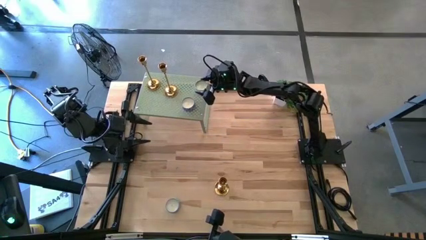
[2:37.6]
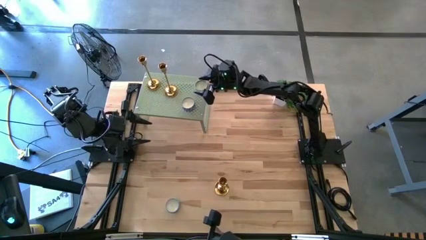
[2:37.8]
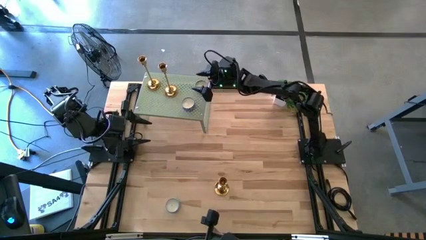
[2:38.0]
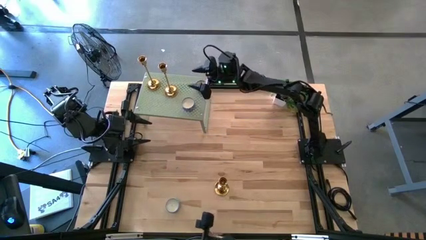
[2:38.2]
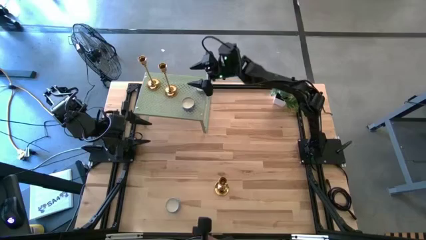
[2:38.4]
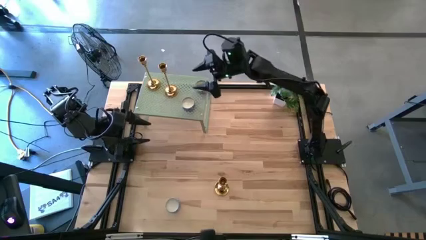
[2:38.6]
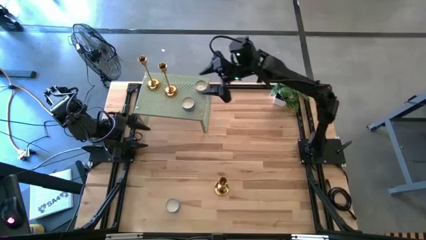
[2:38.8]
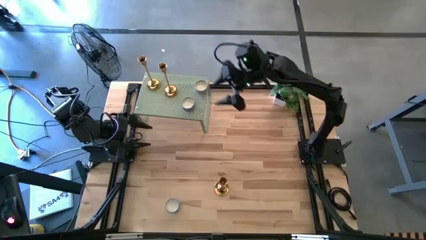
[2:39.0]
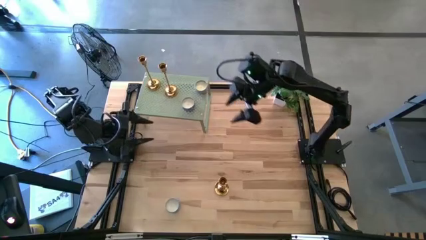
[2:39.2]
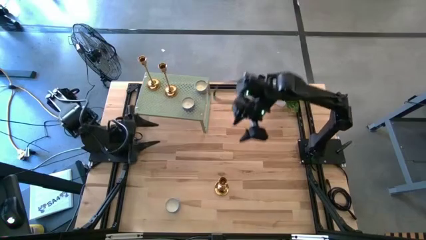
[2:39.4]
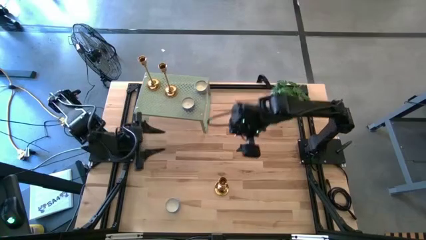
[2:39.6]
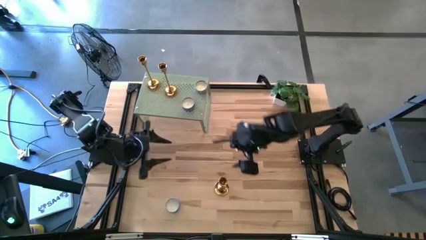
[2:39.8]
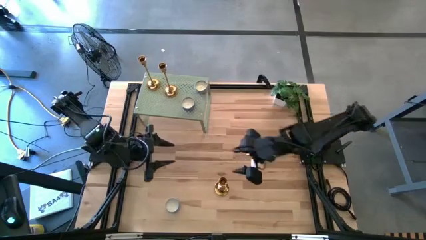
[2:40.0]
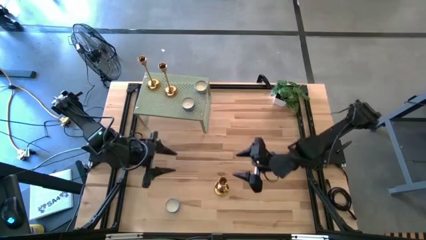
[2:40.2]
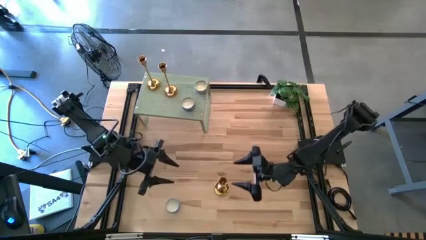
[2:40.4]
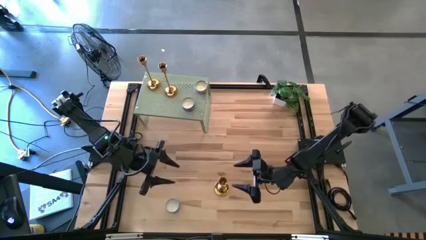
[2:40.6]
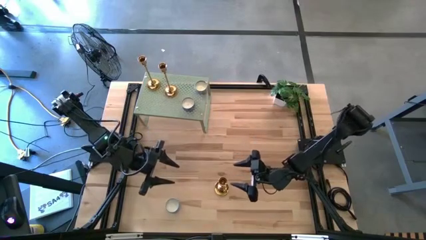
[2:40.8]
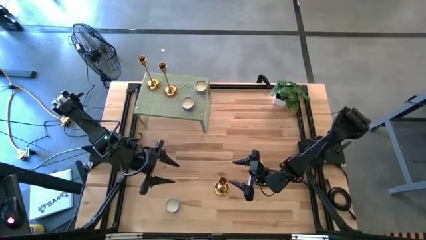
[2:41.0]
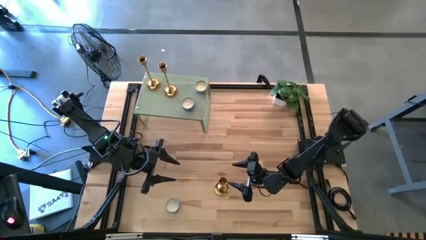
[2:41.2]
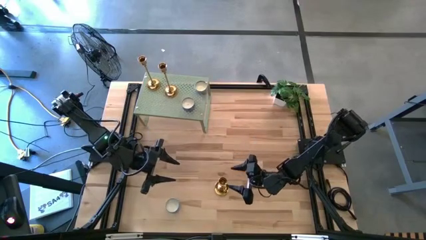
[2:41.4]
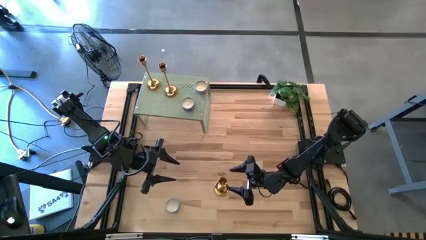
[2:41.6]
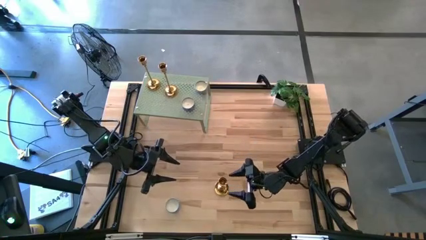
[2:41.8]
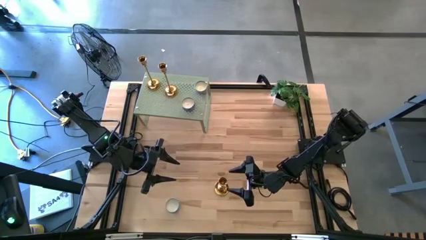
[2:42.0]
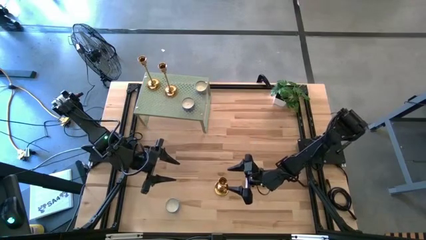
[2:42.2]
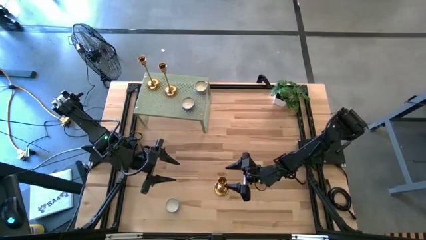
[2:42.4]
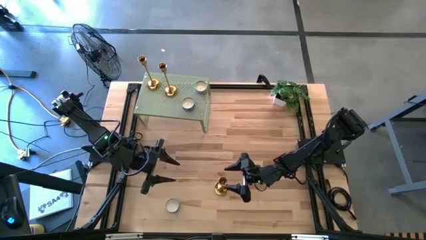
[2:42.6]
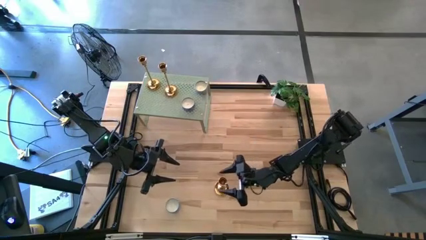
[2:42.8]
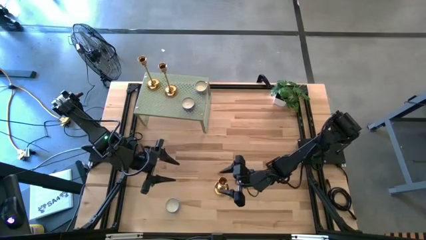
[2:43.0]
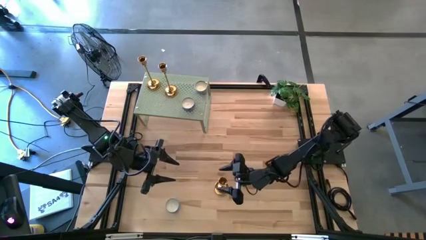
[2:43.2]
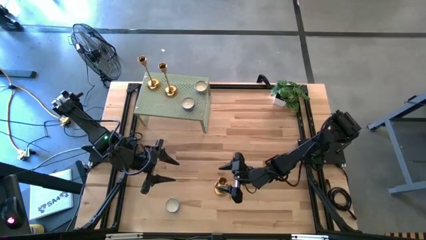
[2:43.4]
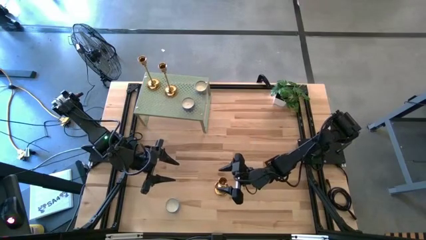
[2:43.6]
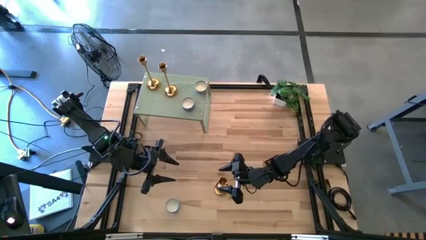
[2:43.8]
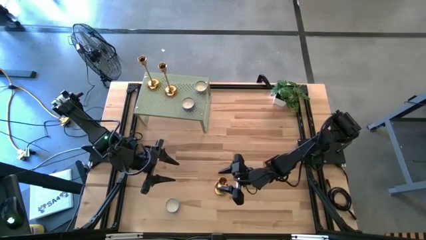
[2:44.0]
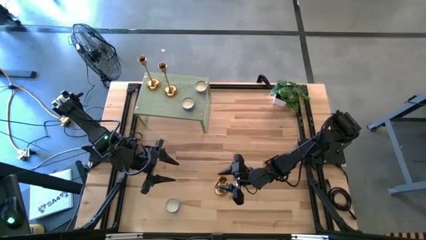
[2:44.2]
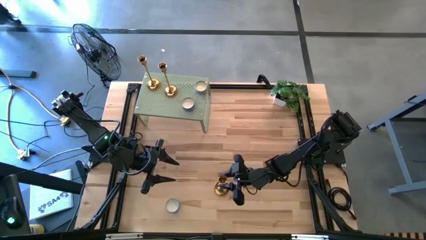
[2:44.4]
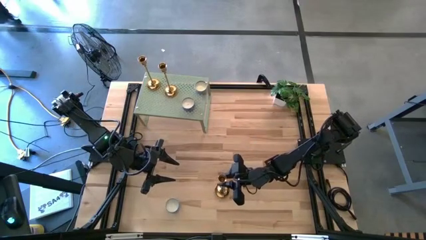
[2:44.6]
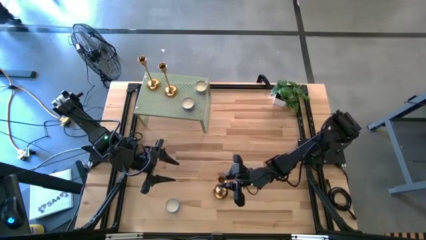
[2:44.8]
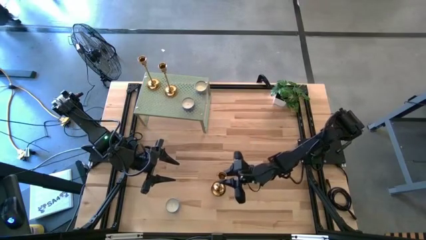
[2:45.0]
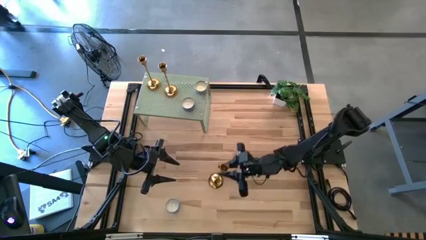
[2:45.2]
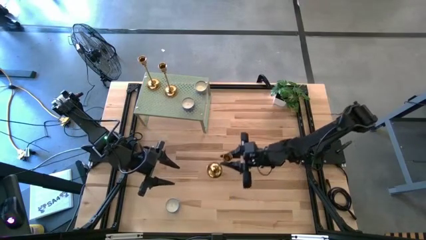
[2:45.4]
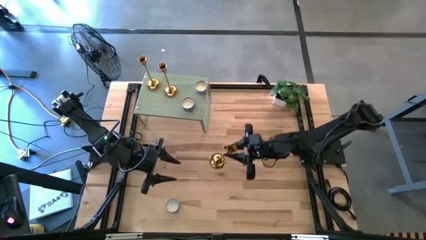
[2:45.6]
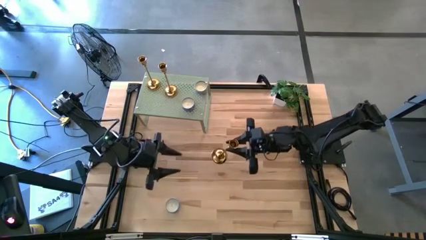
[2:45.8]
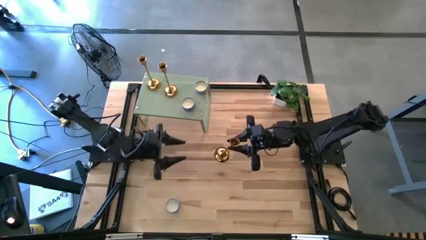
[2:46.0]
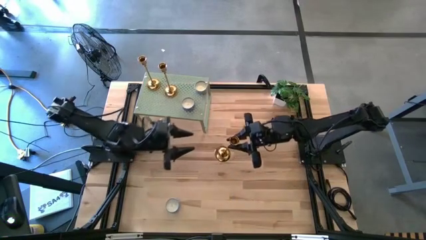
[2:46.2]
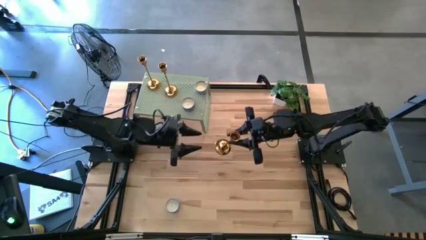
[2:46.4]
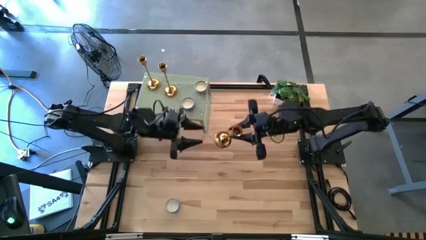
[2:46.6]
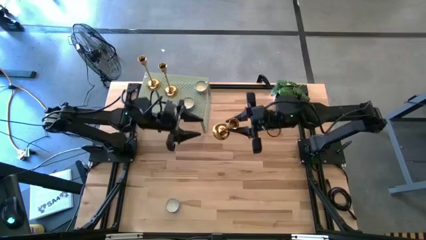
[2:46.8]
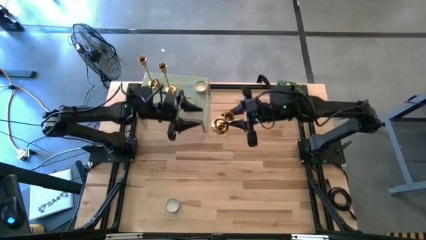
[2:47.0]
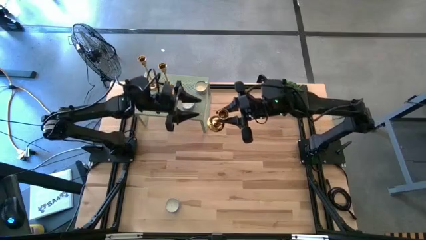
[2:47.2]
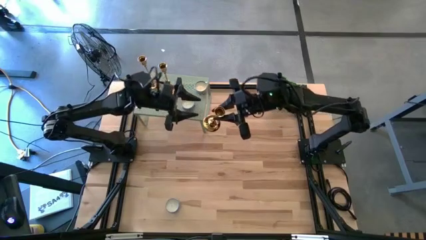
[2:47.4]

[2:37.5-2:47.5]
Task: Pick & Place candle stick holders
Put the gold candle holder on the shelf

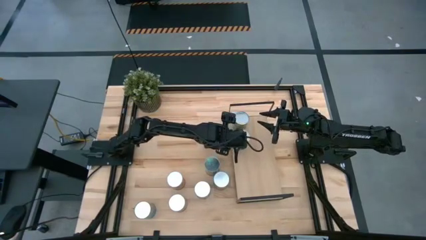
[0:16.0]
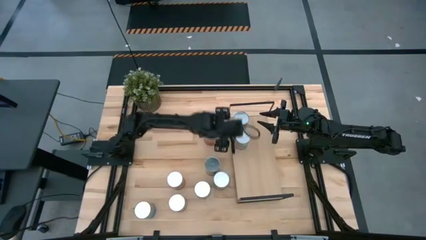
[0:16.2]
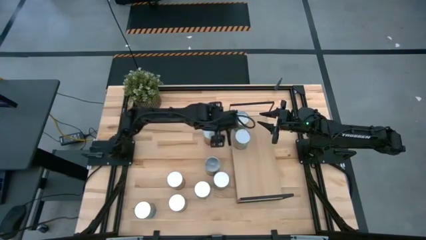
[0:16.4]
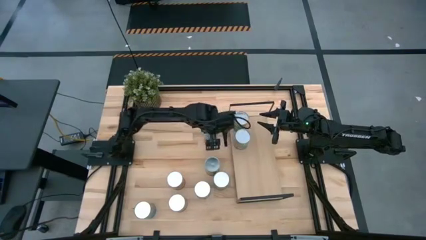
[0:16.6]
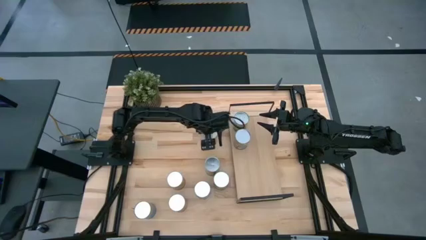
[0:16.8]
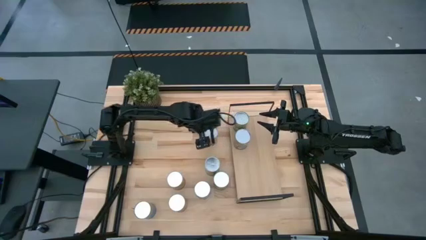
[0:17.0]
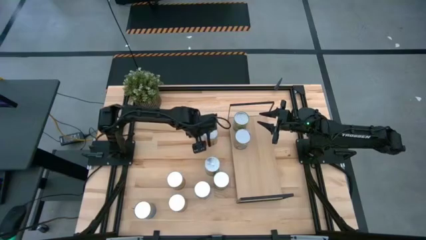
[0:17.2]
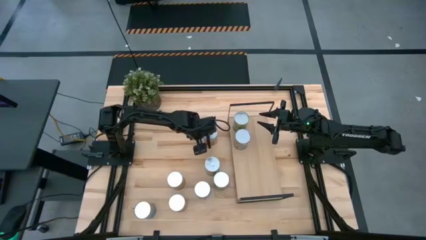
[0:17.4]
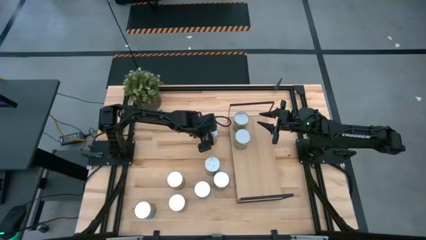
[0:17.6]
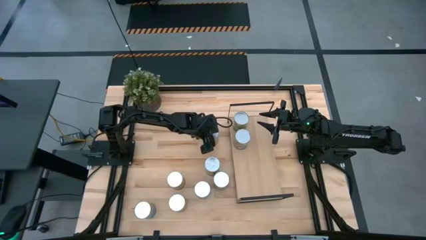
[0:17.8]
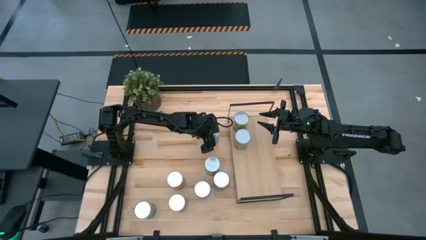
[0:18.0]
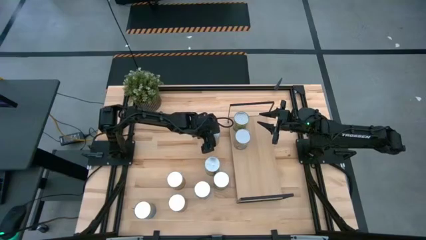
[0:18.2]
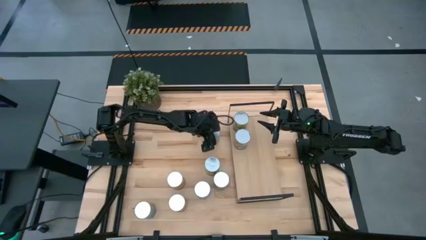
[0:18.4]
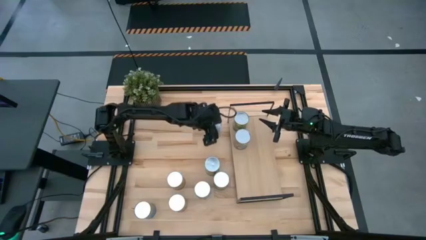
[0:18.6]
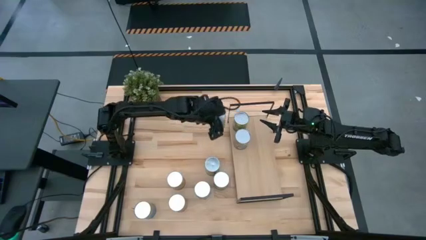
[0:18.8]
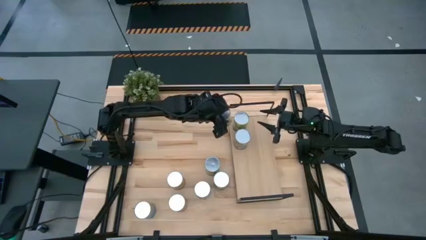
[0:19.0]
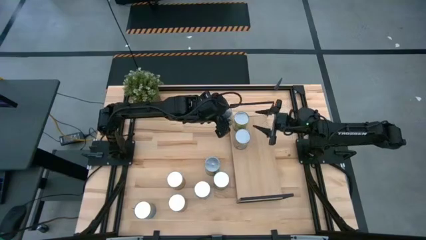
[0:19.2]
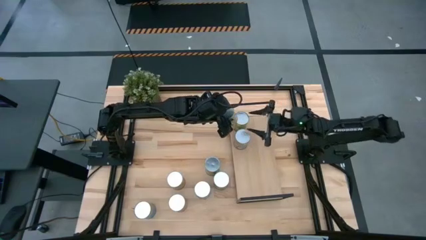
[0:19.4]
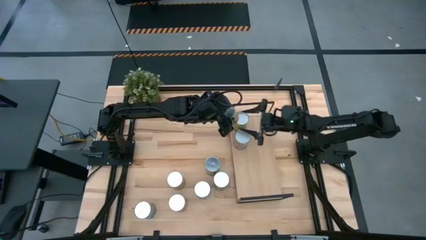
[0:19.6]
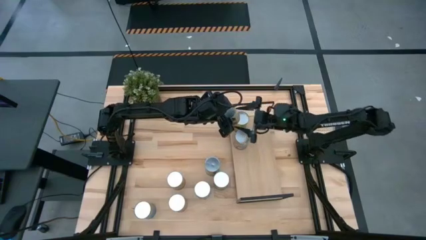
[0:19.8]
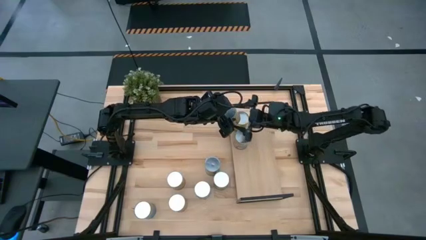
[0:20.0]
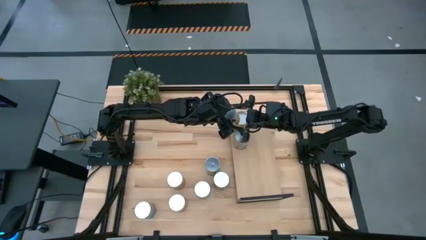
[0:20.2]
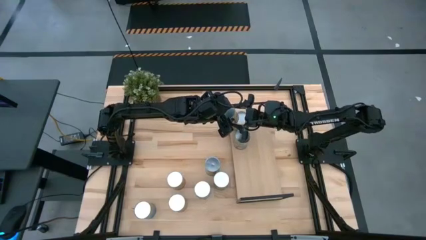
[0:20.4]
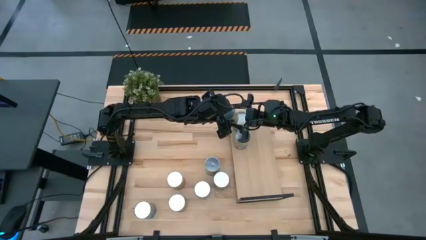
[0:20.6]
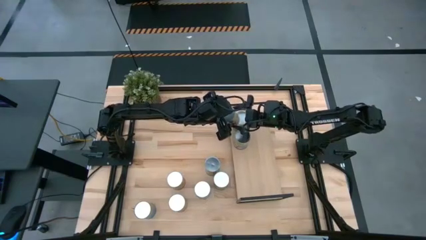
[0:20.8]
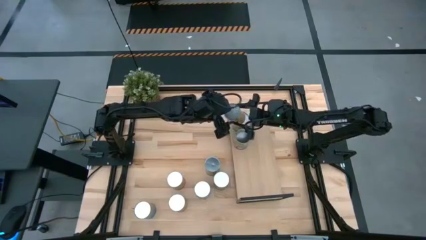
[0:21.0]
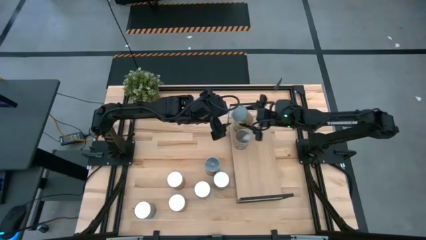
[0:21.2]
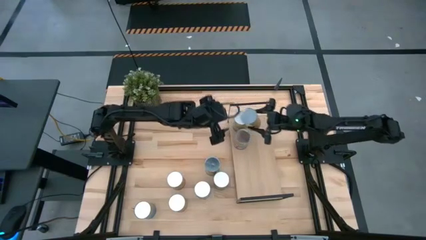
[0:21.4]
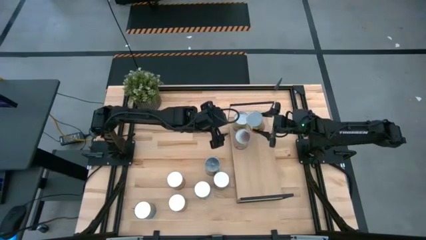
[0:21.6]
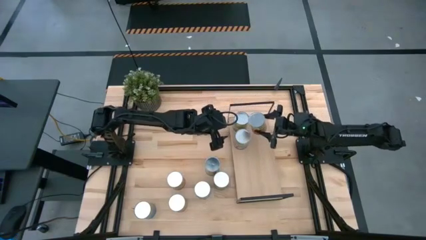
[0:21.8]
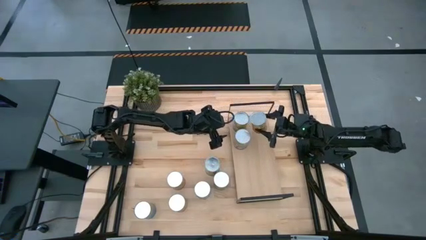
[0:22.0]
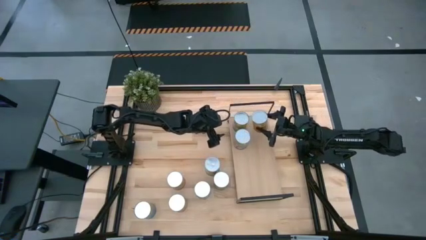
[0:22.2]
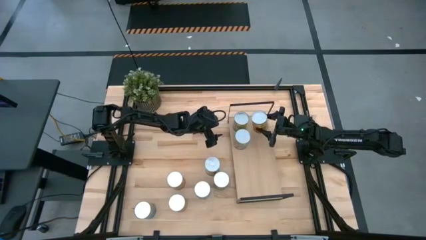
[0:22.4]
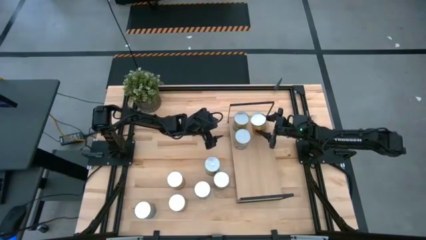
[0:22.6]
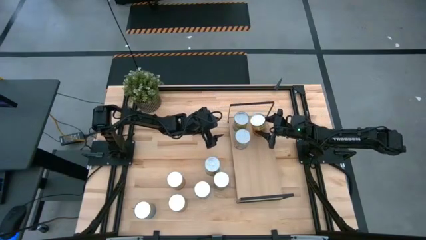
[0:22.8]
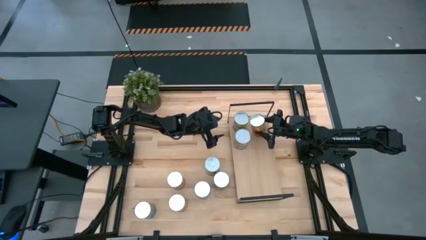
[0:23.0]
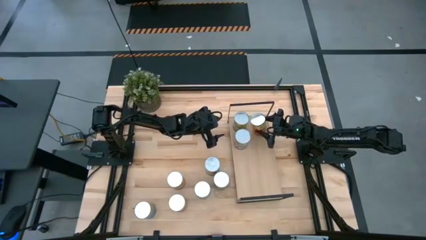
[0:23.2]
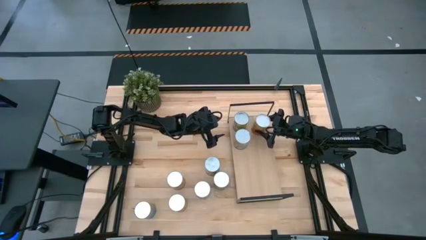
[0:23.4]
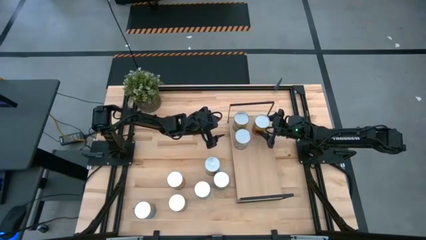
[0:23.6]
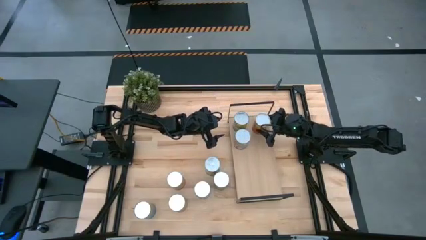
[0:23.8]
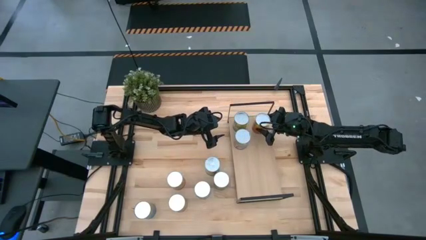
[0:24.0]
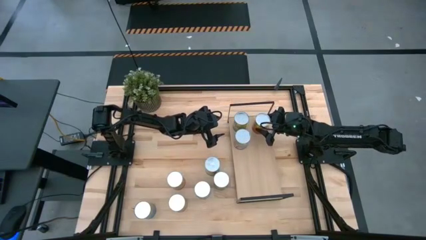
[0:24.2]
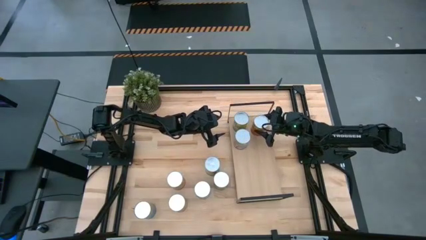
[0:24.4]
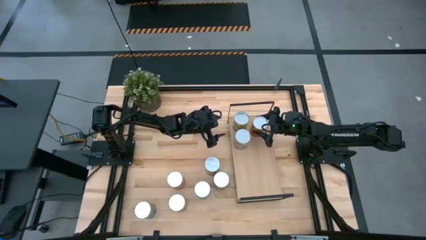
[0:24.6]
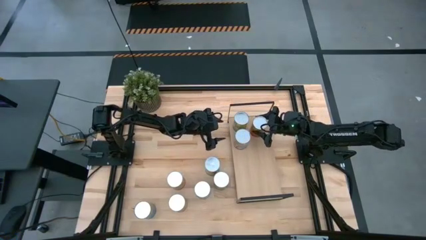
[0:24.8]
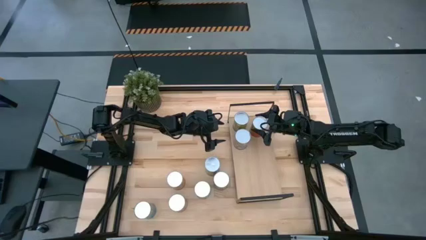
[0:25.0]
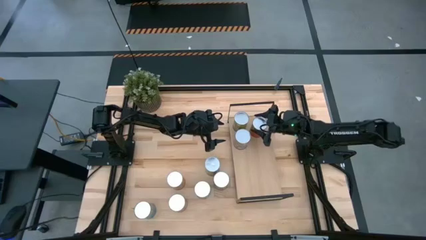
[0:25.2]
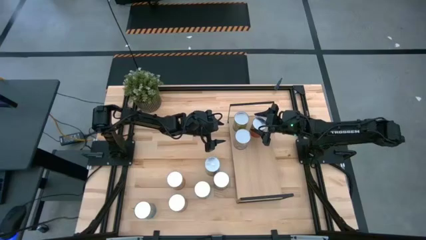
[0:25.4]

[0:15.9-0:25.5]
Task: Pick and place cans onto a shelf
Put the top canned pineapple on the shelf
